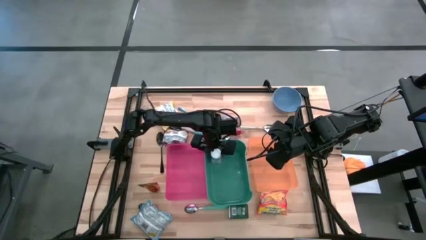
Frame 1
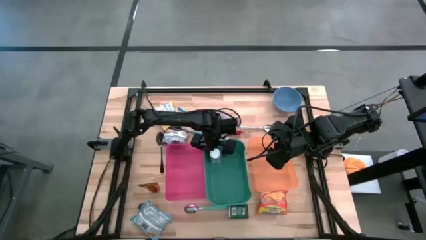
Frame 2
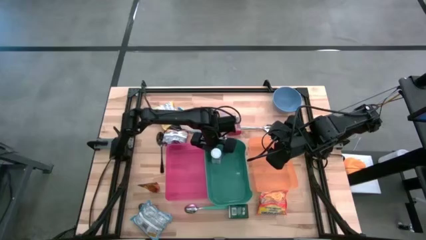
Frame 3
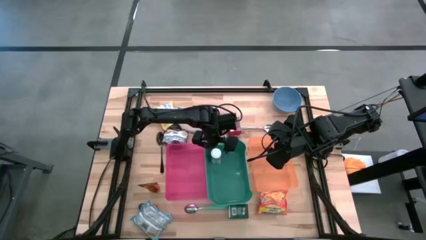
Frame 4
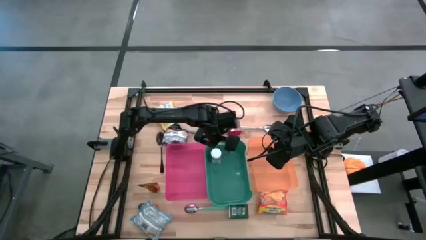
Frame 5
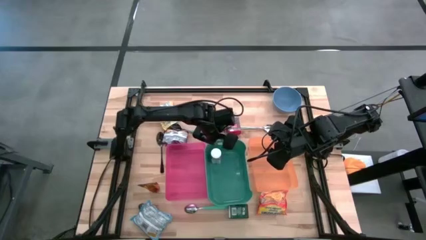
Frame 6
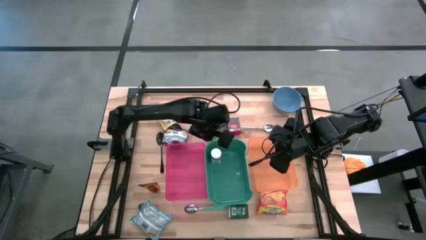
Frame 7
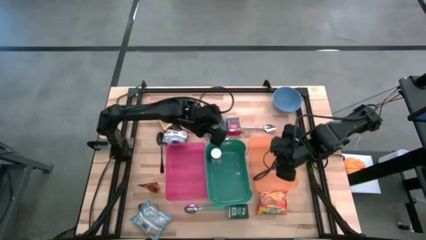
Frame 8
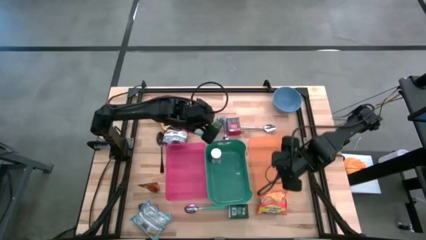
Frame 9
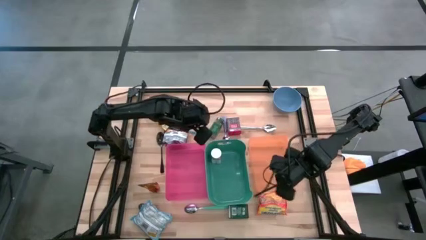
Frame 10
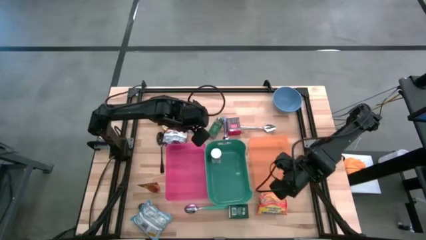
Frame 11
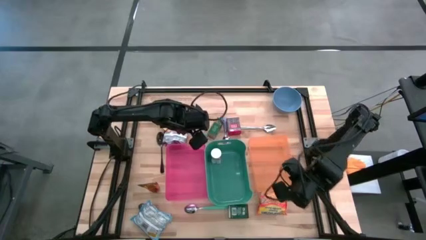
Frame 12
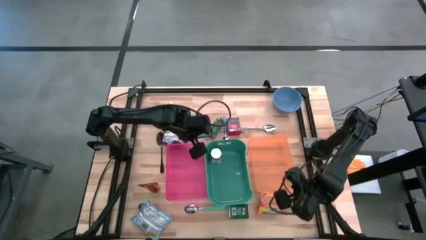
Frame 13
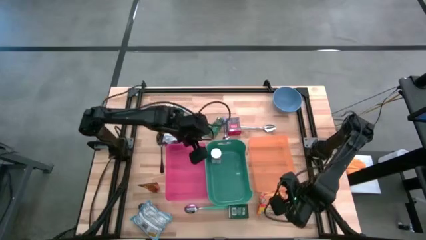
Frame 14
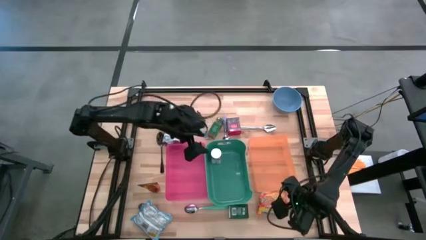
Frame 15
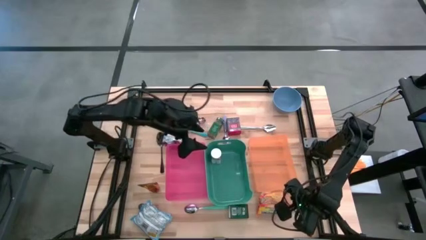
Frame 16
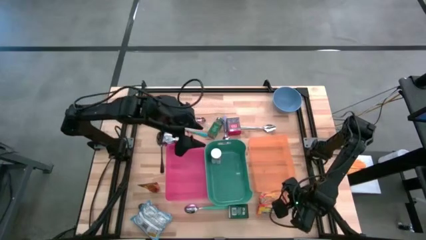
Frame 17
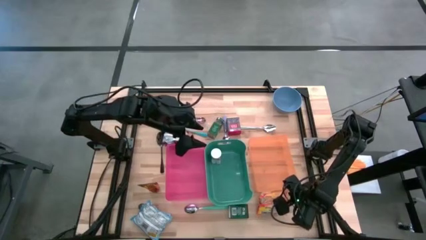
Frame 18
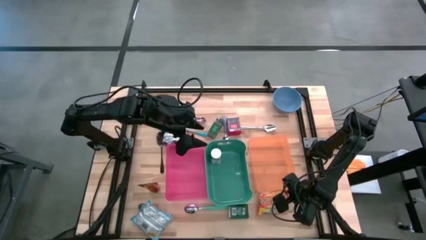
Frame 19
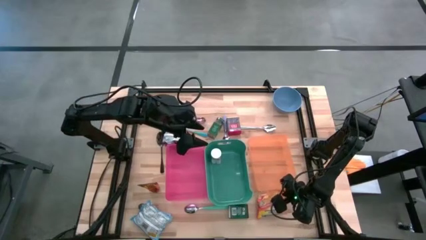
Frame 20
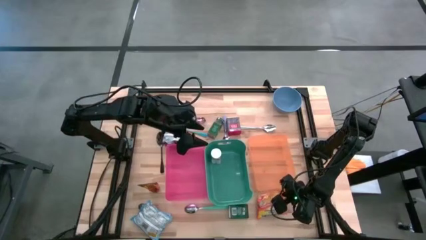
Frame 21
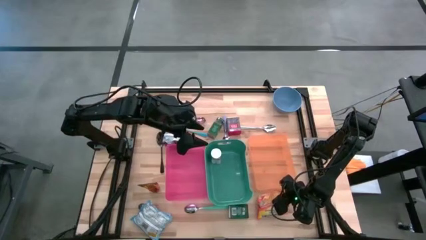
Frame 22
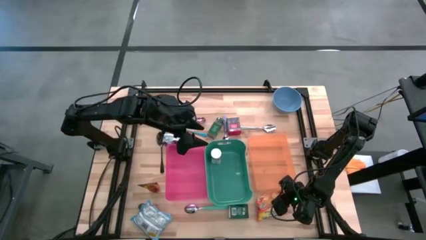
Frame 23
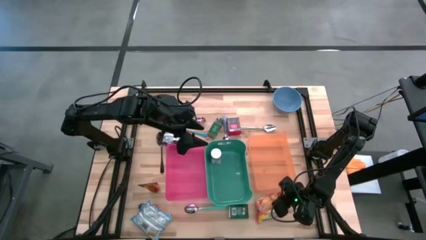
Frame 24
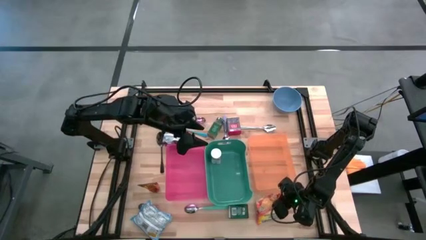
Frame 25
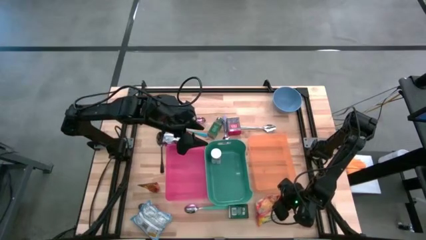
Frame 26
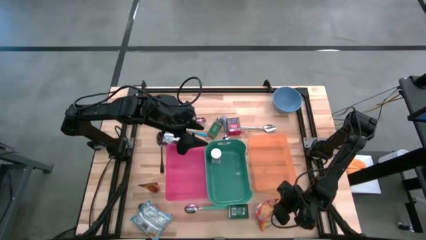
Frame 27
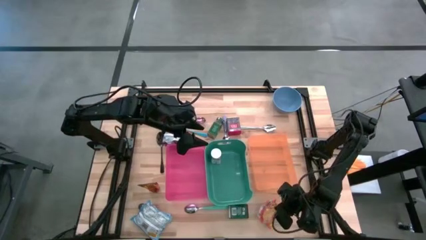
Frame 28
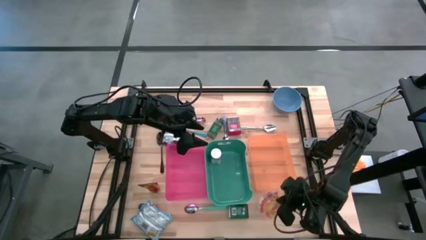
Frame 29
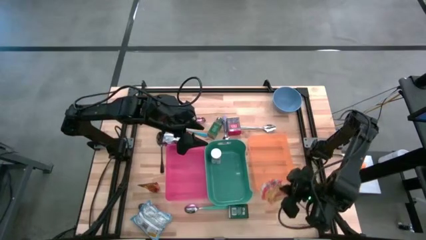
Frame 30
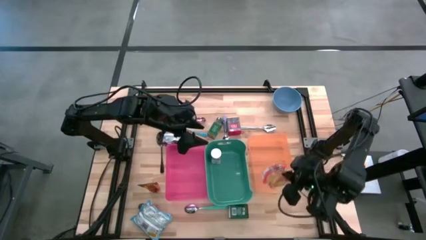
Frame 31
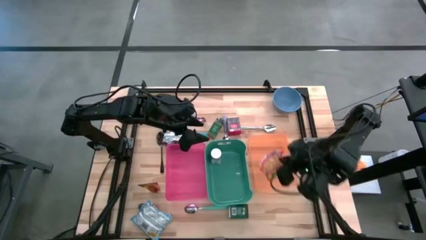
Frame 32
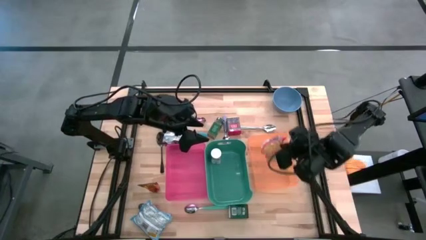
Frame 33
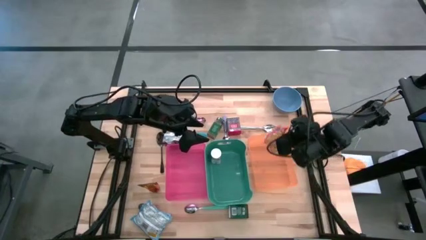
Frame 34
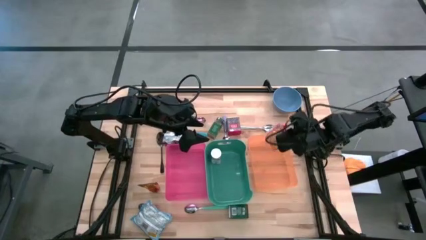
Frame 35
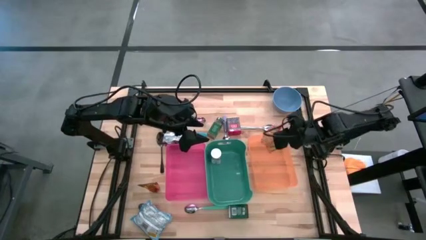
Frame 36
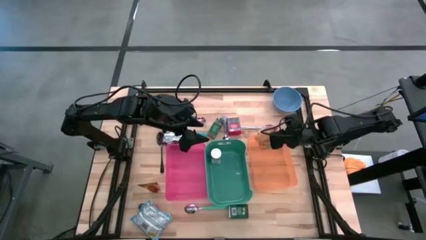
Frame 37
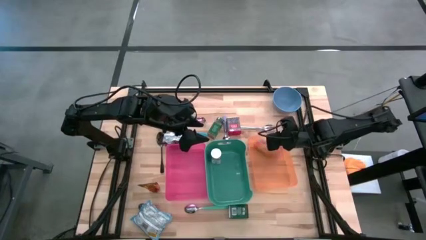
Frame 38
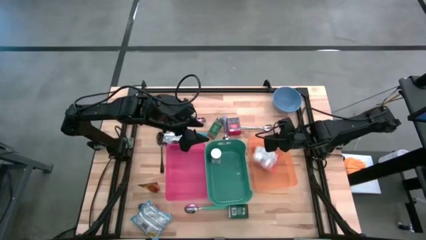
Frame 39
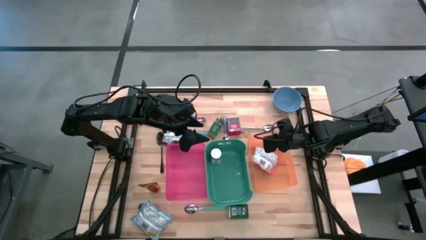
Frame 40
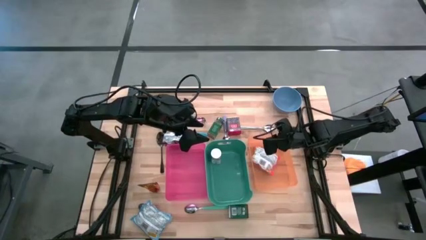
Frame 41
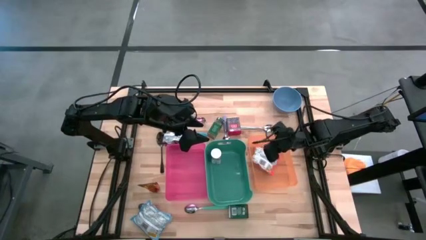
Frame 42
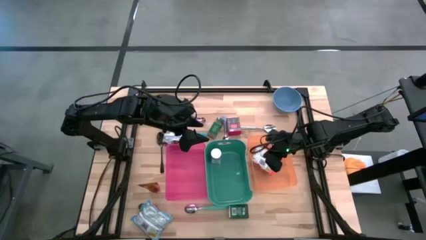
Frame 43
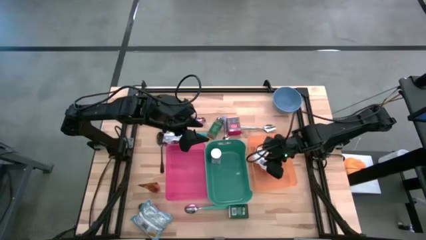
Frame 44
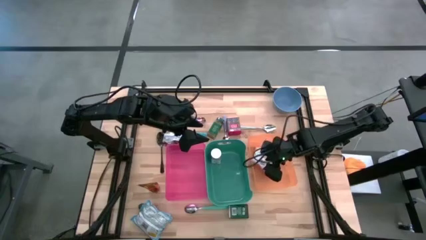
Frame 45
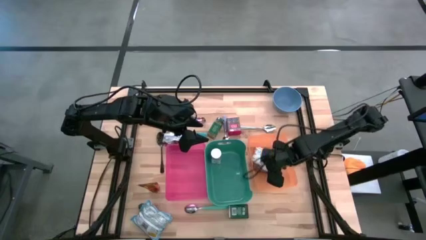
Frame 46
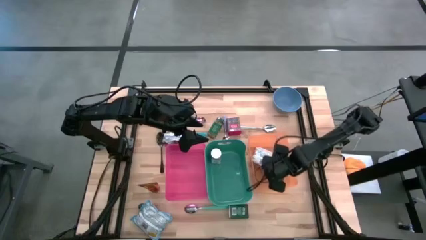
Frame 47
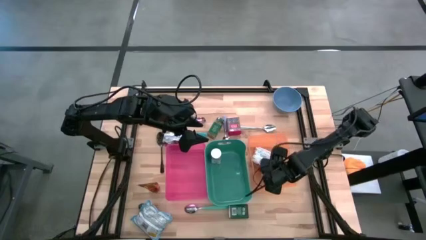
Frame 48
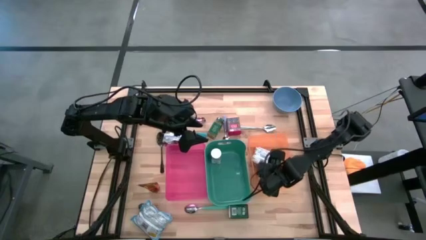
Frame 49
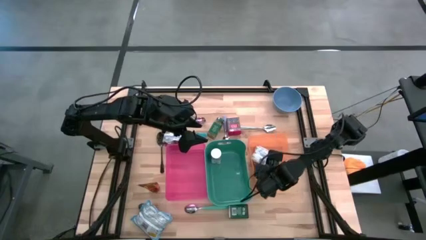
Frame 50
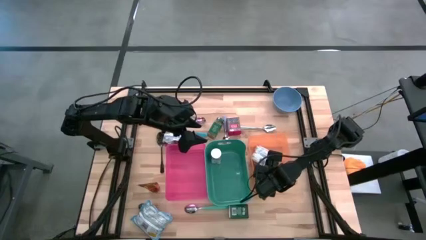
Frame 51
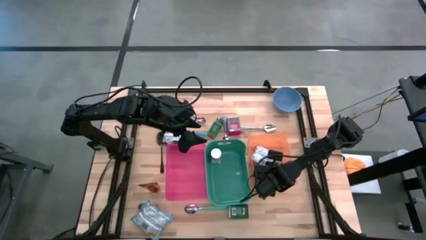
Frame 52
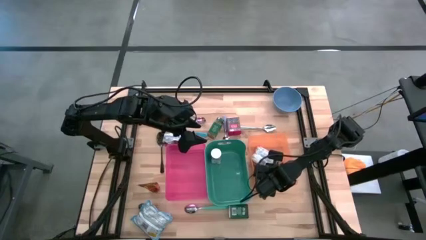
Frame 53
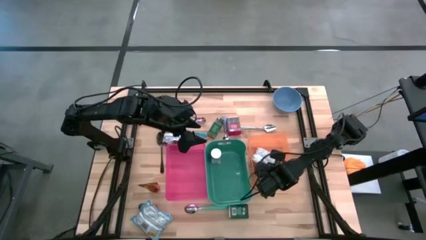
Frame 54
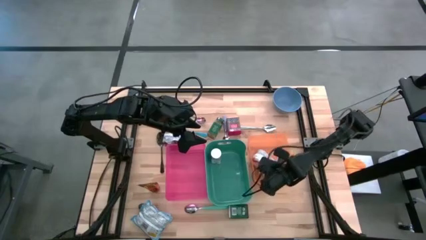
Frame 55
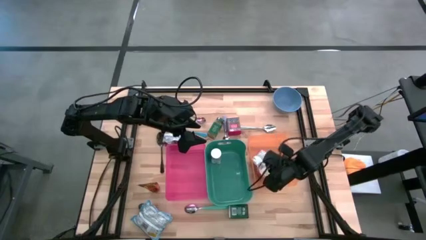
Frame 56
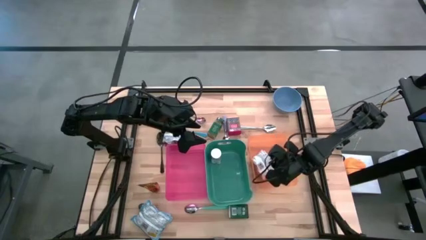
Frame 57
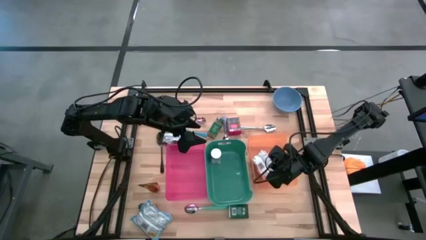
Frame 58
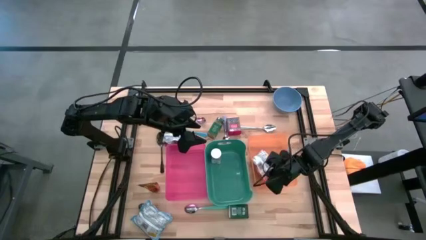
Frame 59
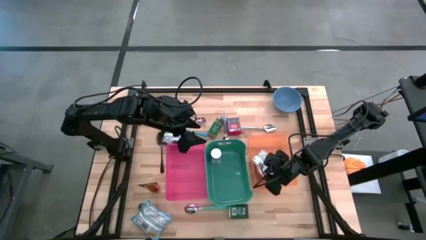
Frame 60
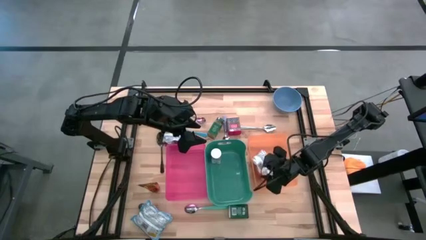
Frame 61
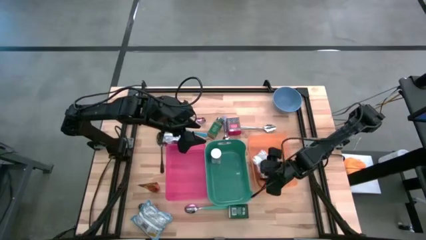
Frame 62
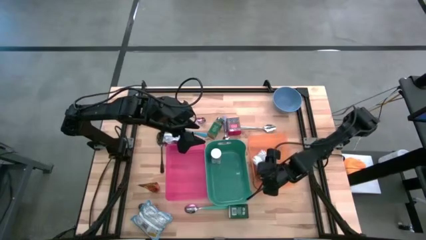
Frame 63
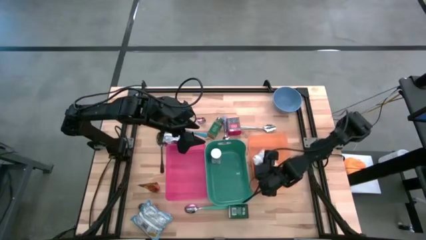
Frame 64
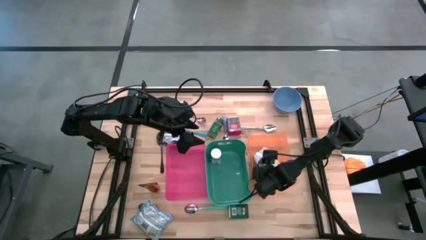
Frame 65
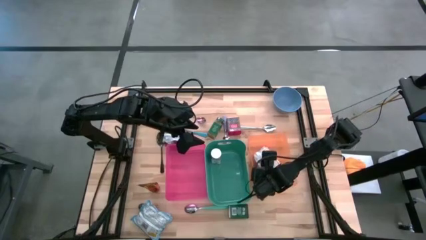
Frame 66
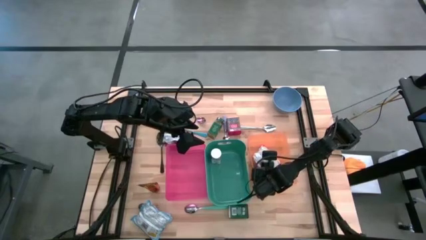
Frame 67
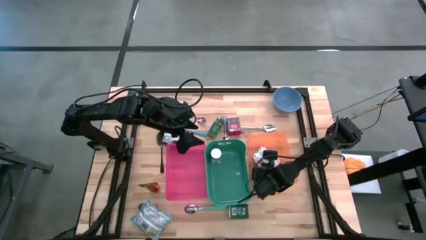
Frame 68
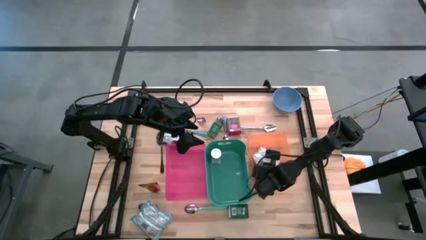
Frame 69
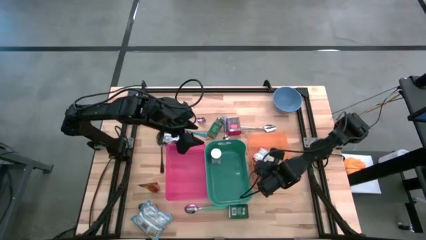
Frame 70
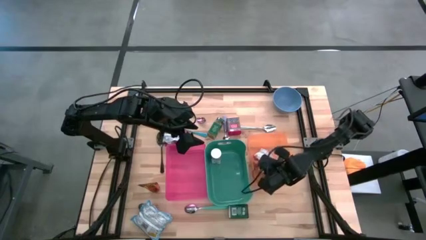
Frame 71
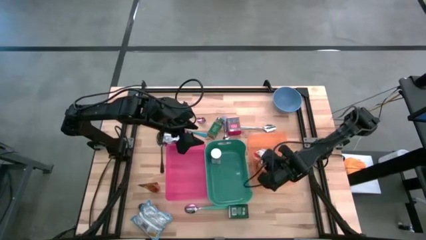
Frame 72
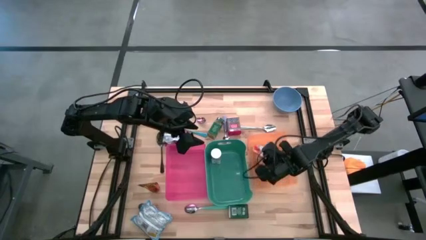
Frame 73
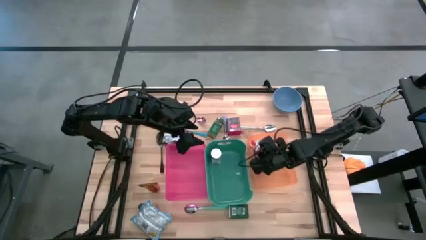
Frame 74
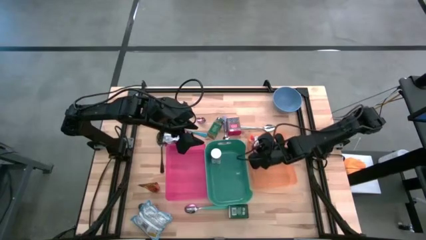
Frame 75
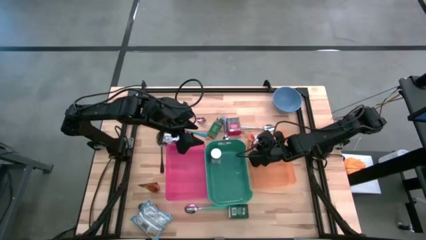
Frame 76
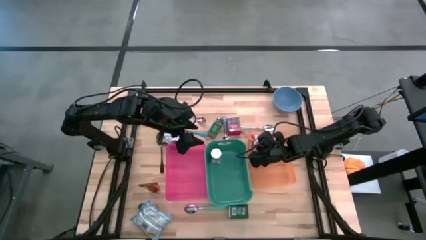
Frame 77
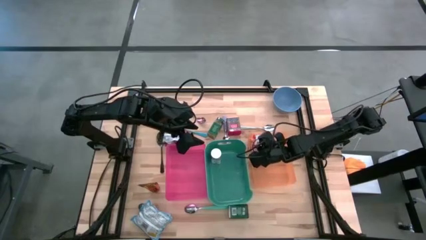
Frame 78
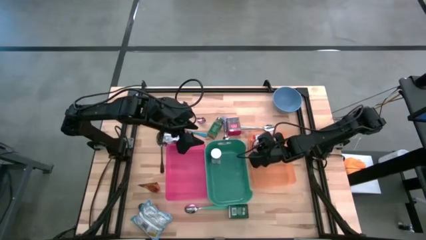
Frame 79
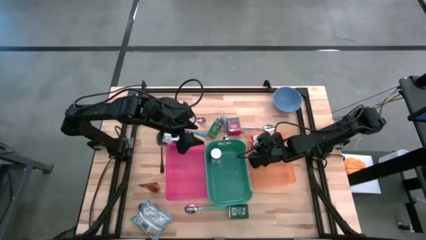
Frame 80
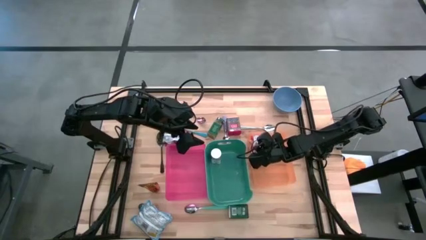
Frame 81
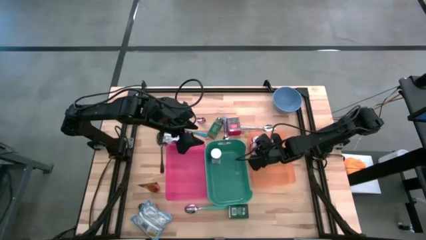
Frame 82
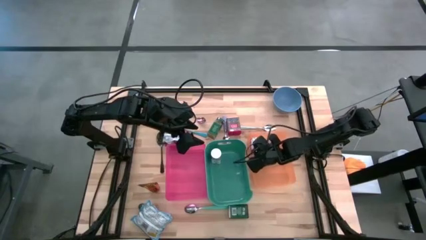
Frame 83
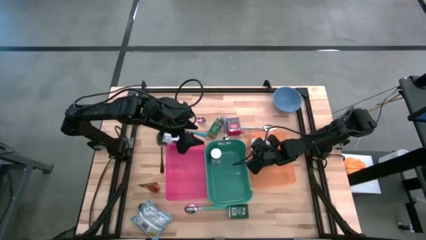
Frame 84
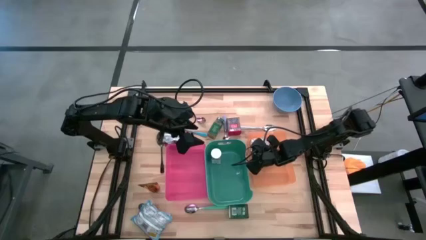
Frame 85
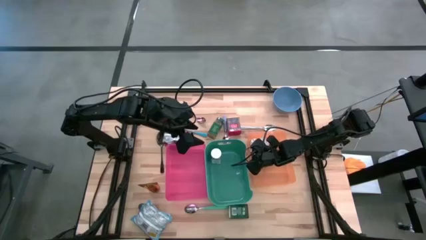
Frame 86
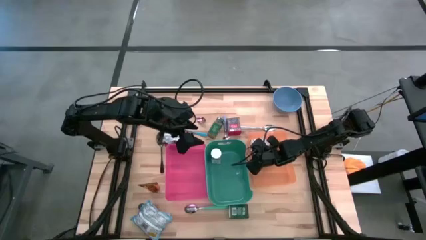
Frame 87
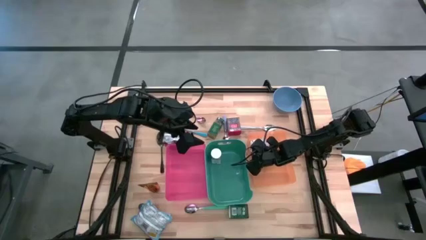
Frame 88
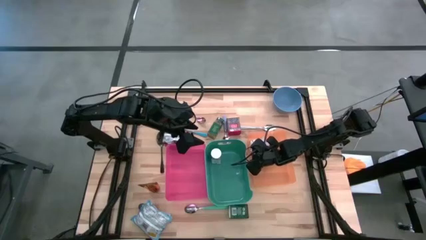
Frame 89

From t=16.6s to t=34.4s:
Put the orange noodle pack into the orange bin
